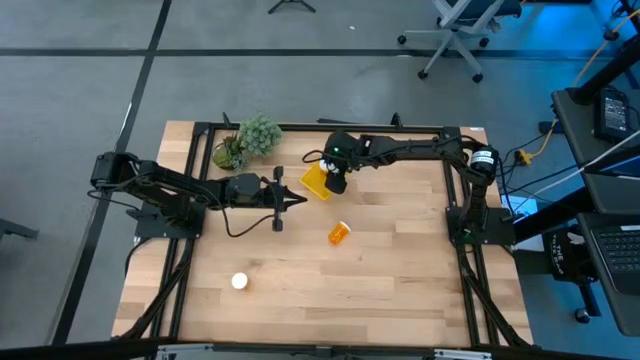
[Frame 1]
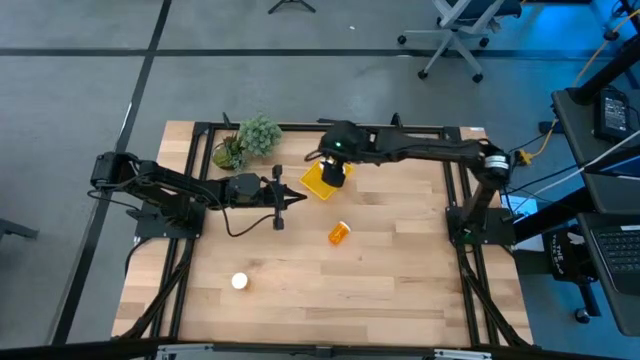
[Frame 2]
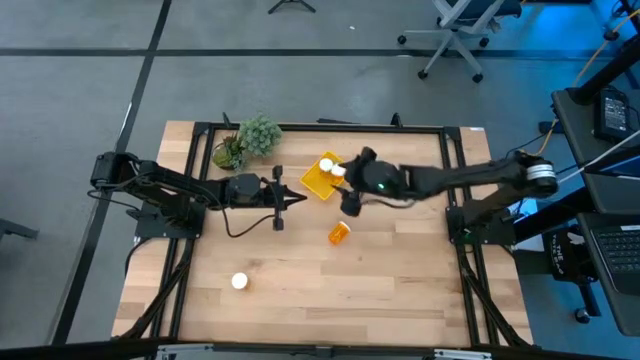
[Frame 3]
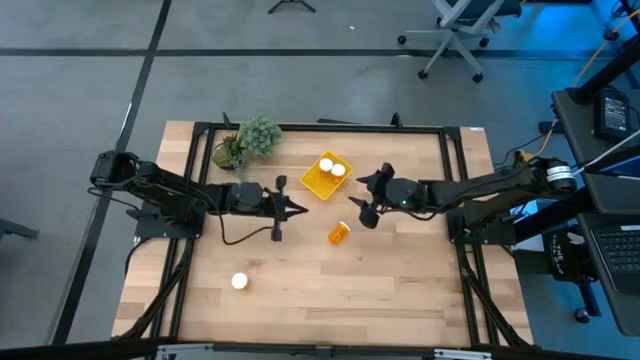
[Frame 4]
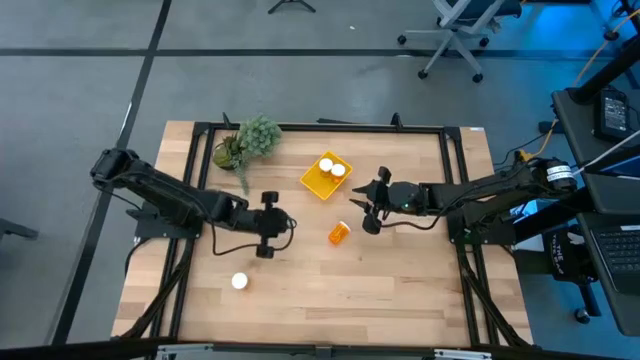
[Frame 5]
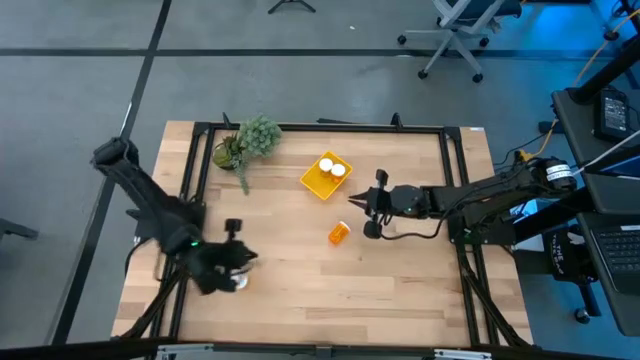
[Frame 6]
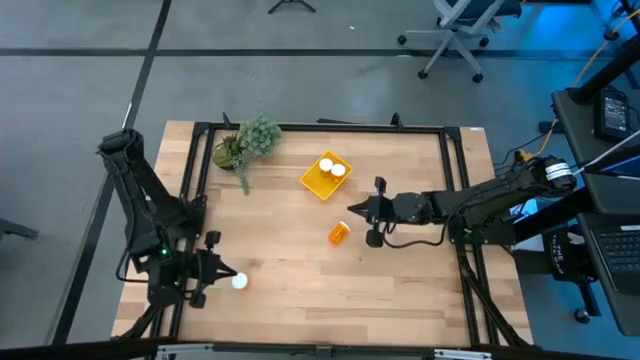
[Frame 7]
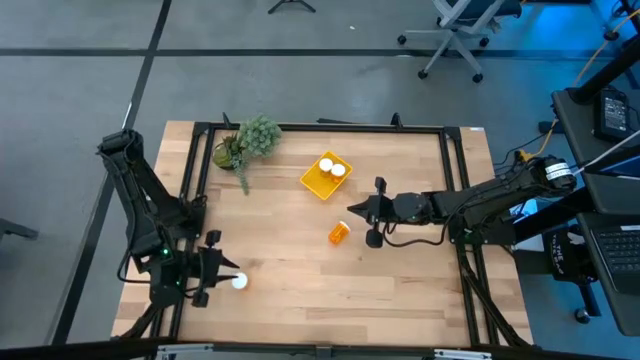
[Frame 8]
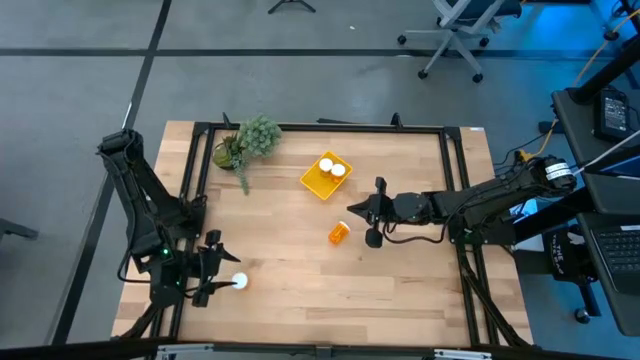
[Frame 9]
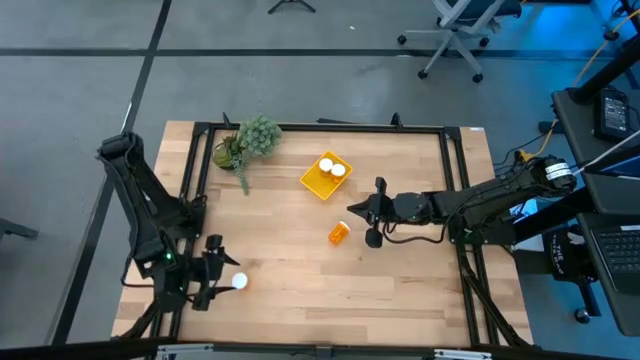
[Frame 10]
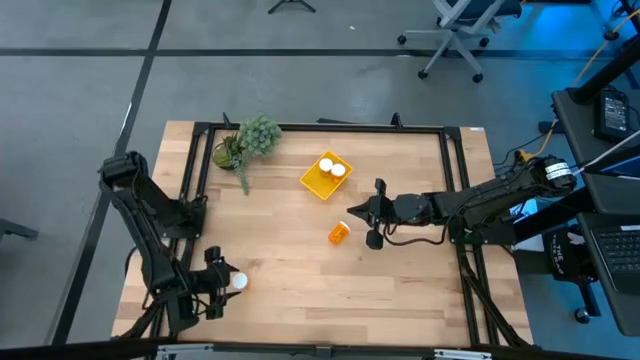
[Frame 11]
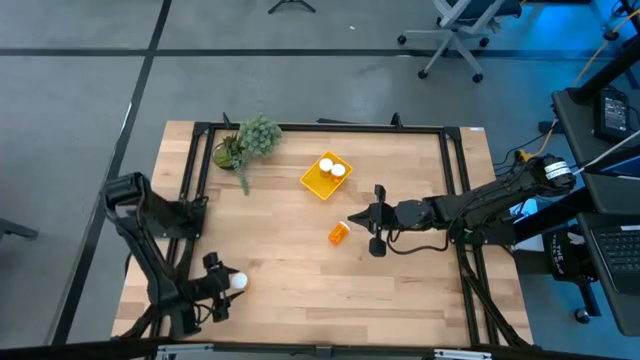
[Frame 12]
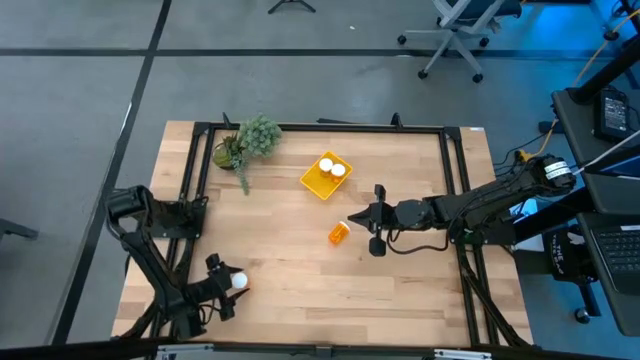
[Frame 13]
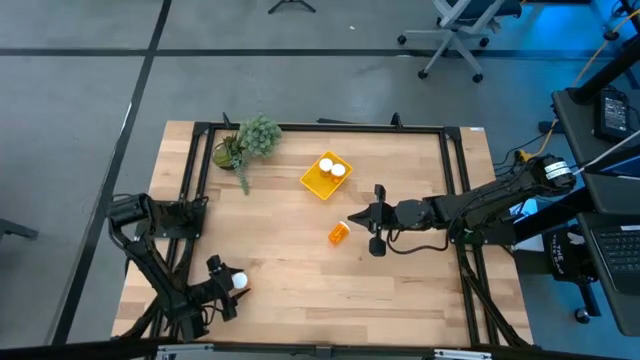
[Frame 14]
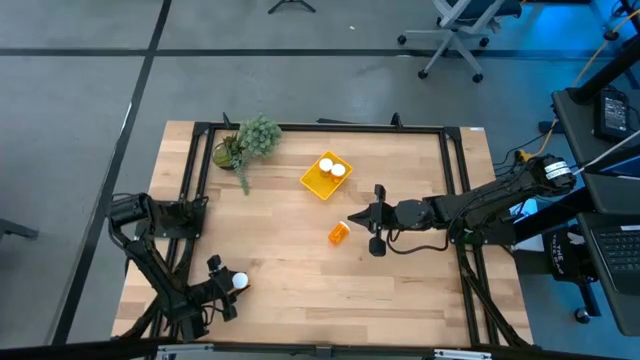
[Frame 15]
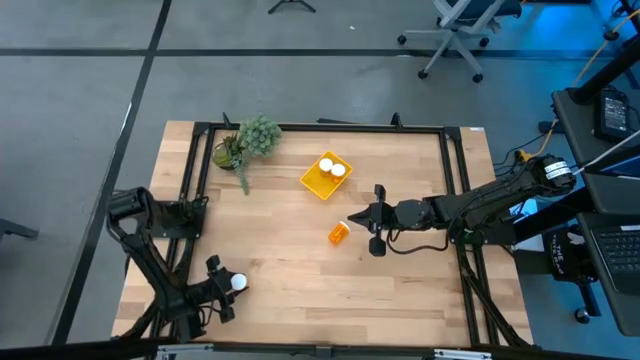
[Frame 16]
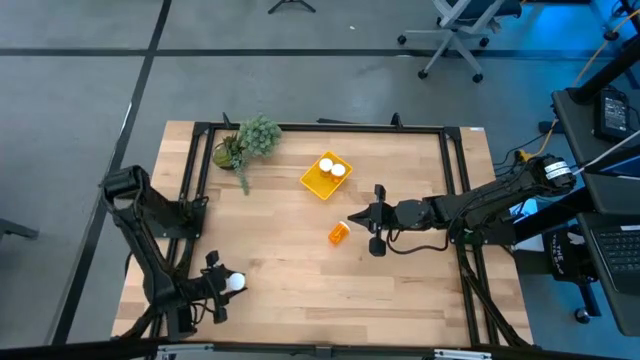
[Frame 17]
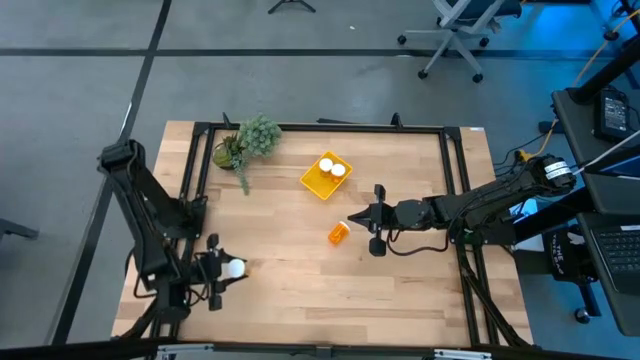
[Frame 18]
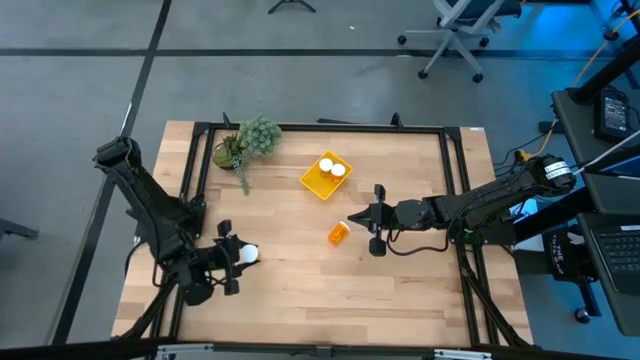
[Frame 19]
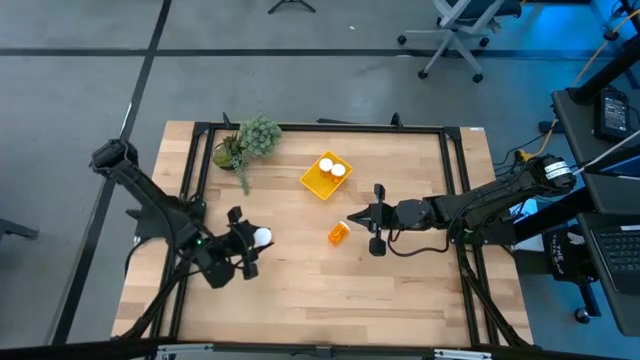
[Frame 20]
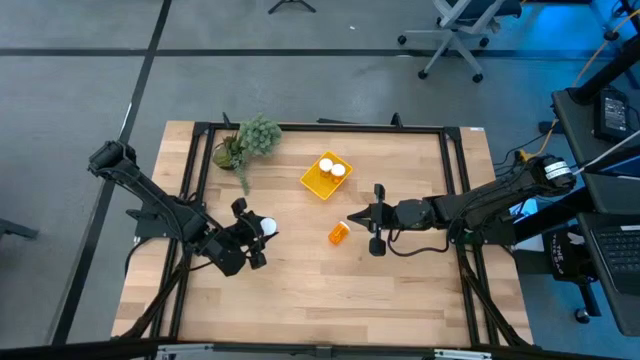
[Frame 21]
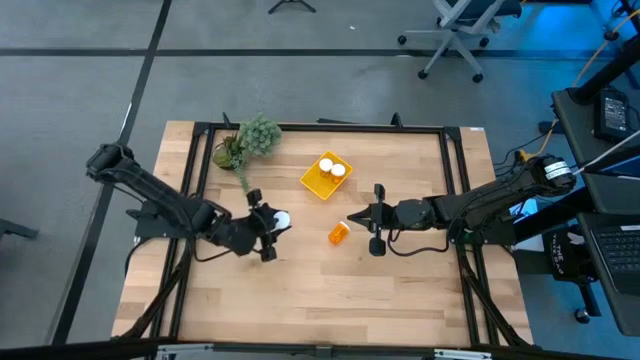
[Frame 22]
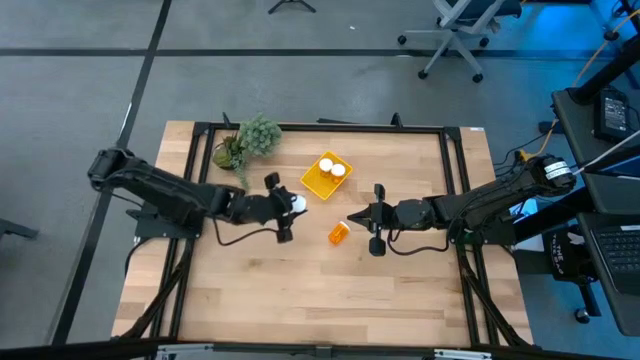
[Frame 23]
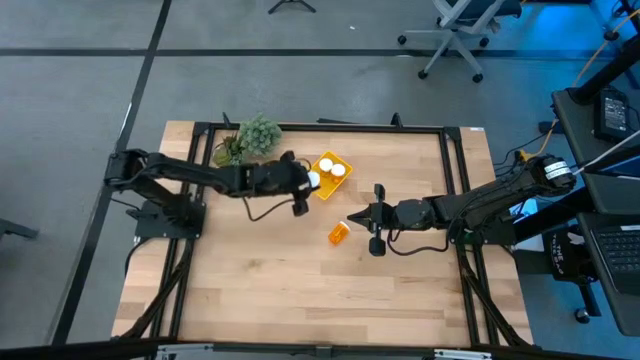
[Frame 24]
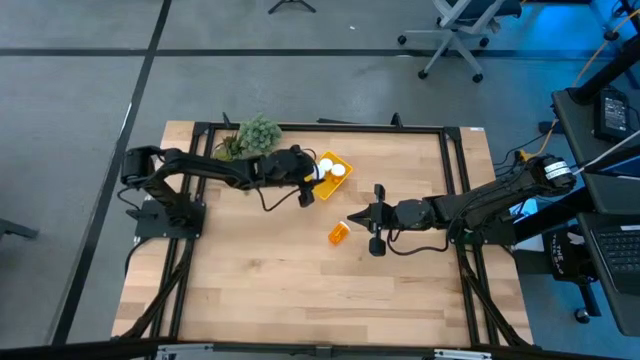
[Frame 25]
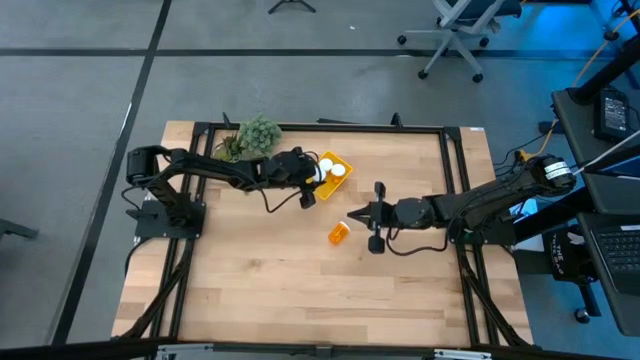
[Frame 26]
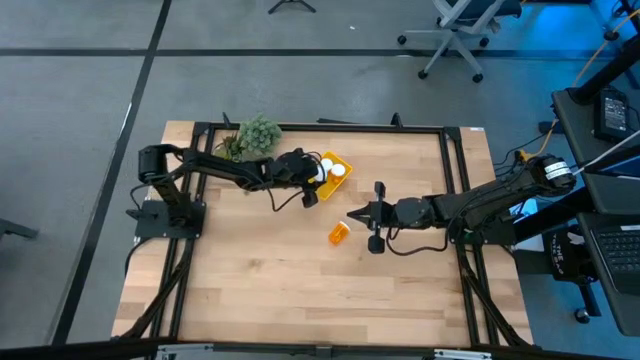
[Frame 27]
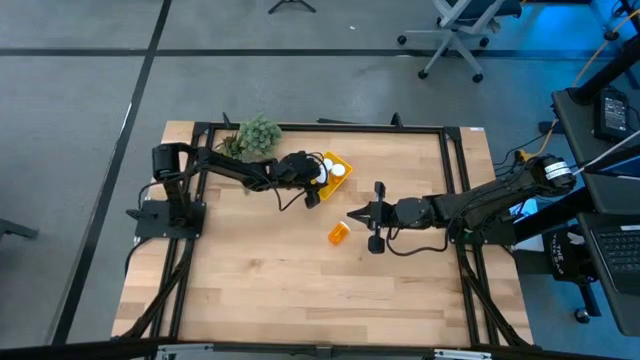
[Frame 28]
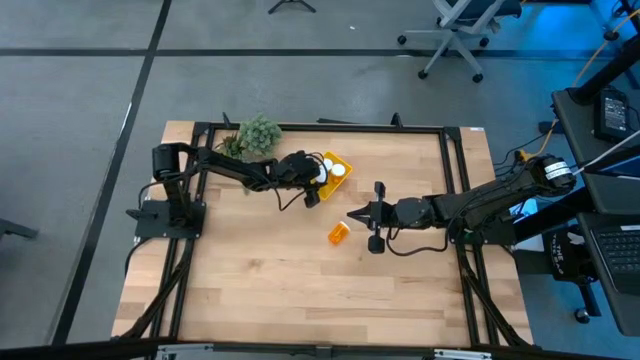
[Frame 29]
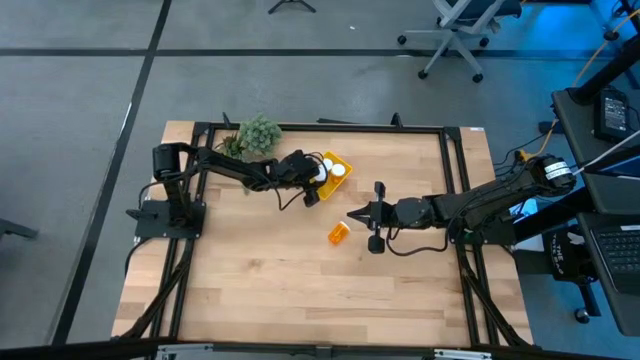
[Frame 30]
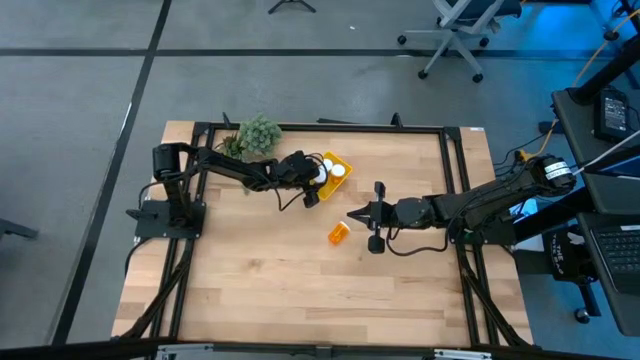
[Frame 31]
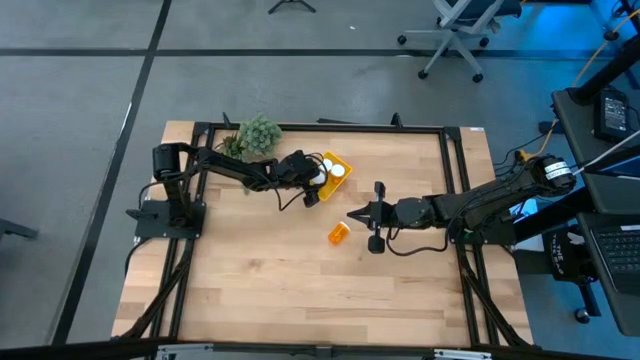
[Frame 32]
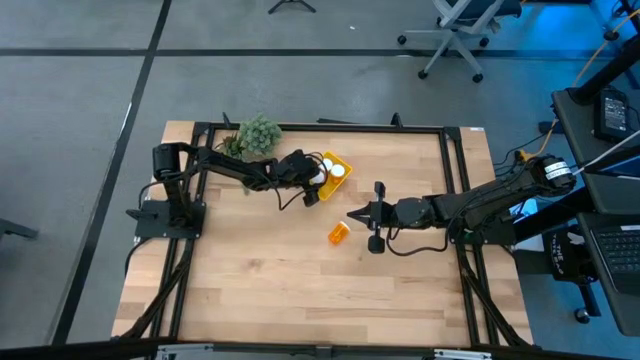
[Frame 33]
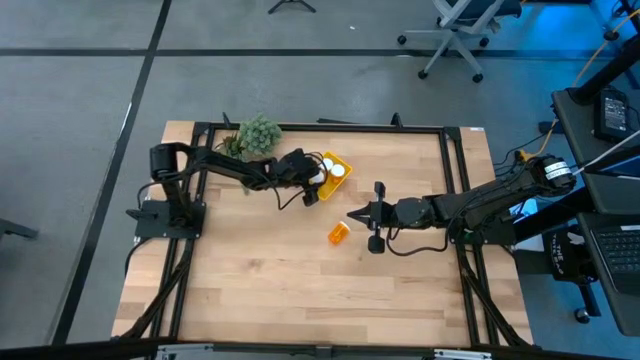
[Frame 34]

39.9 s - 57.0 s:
Task: Pick and place pill bottles into a basket
Put the orange pill bottle into the yellow bin

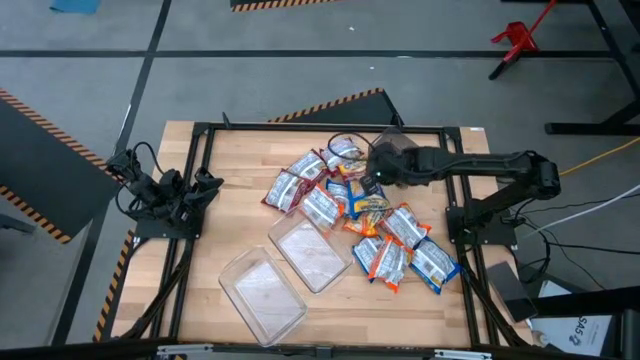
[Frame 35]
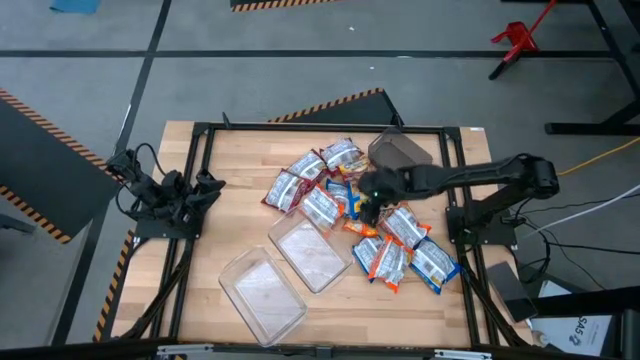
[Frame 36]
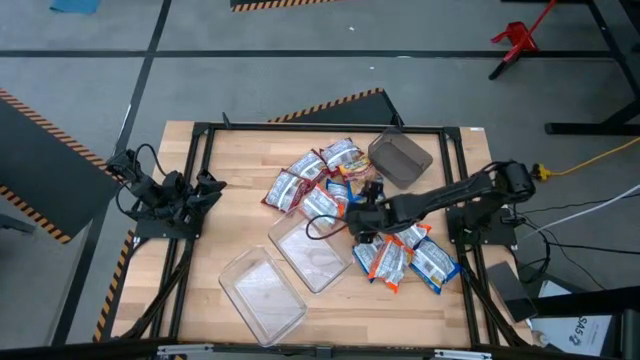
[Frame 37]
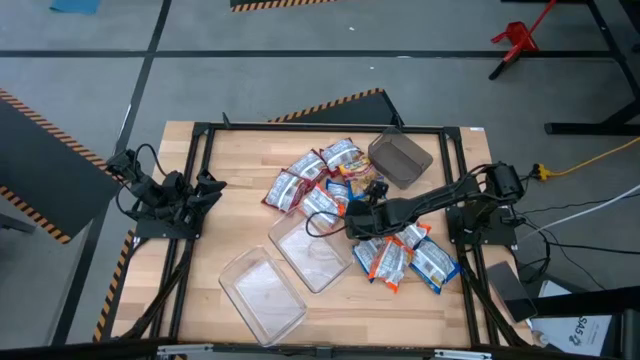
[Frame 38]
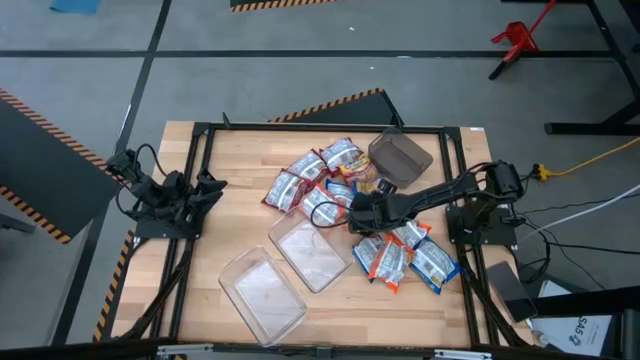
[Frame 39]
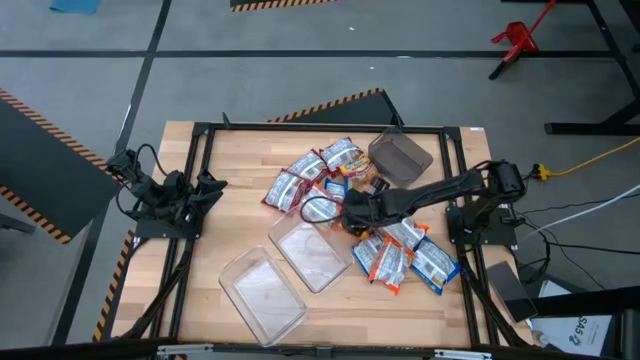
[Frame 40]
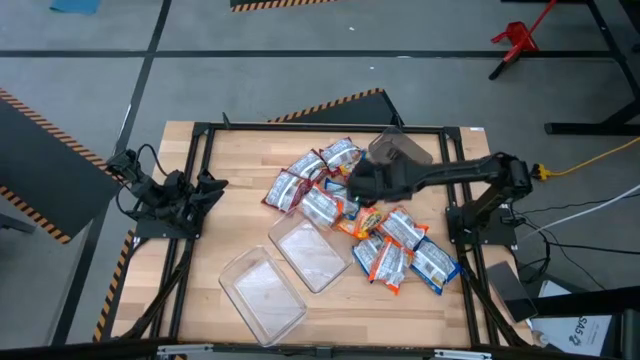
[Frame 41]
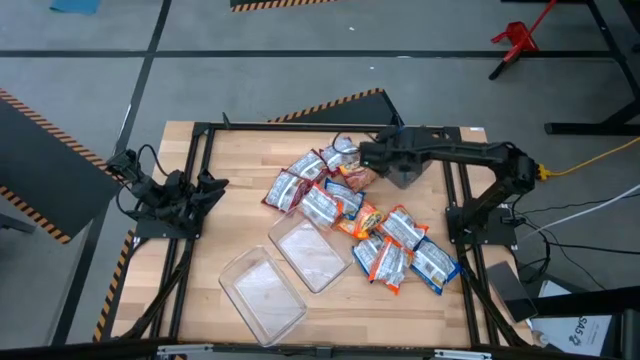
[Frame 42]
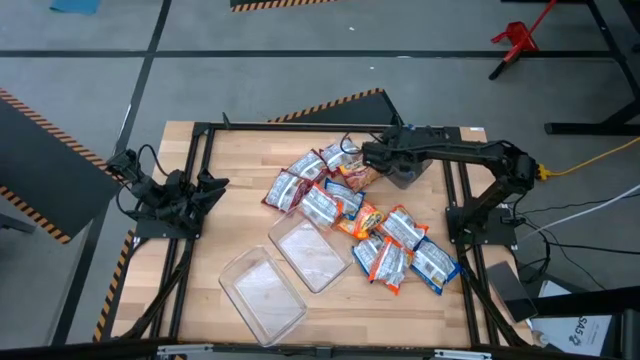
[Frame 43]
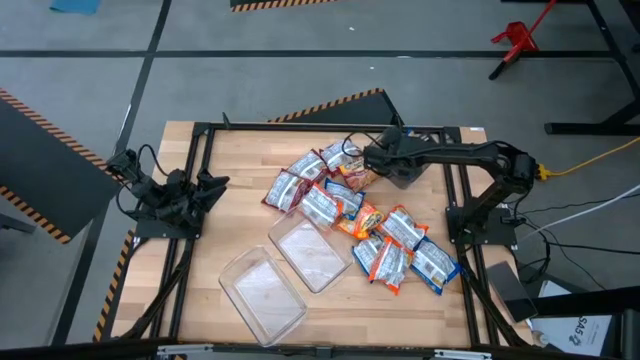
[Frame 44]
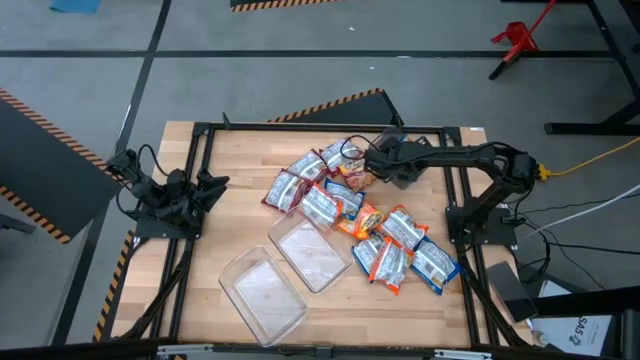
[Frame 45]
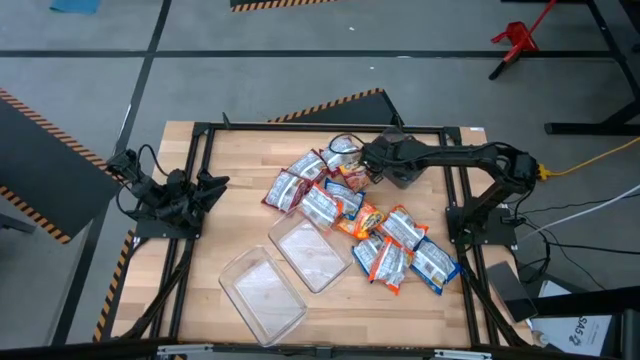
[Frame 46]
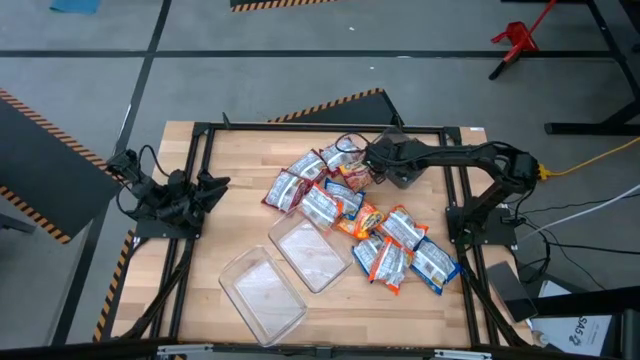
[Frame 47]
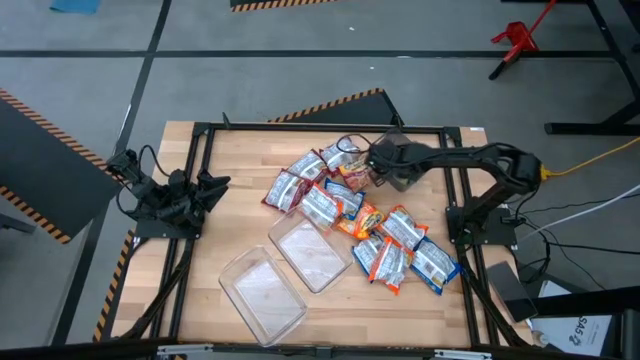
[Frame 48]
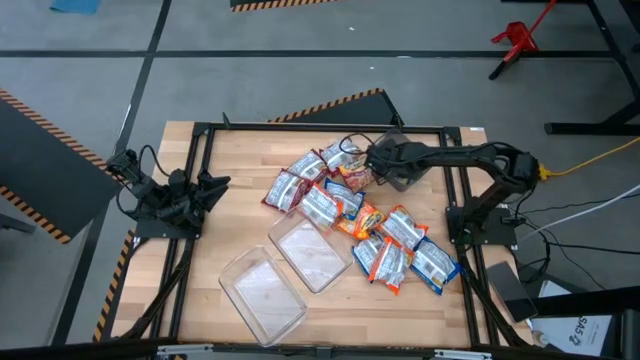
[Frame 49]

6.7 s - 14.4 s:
Task: Sort Maruchan noodles
Put the blue noodle pack into the black bin
